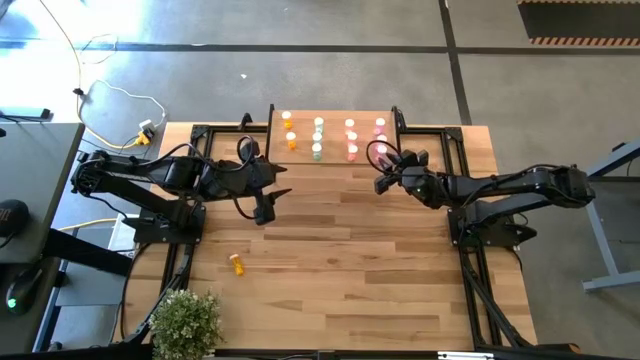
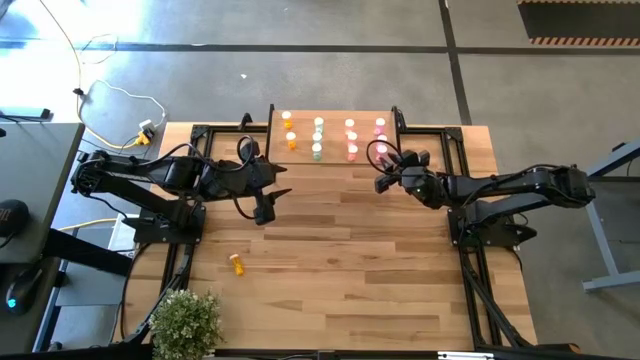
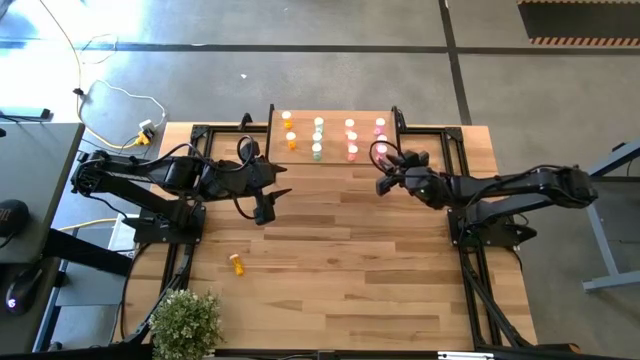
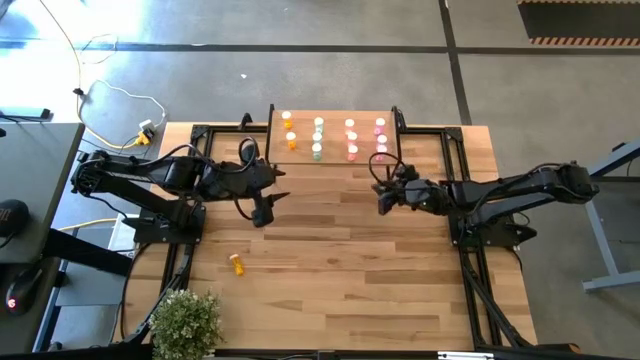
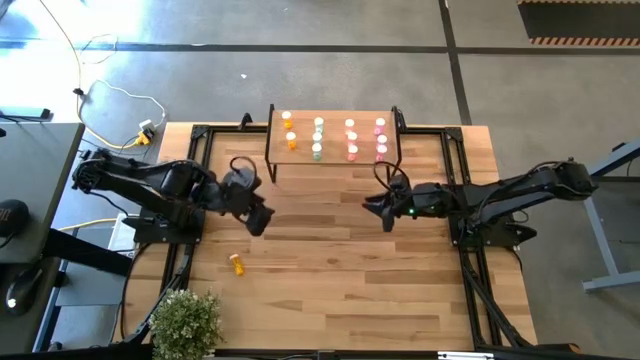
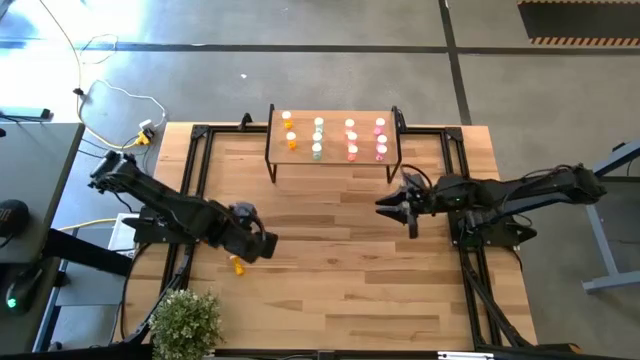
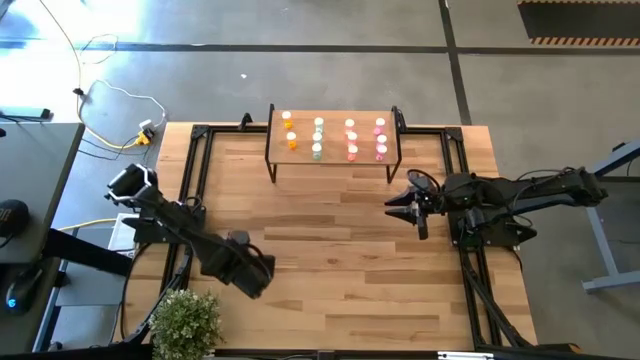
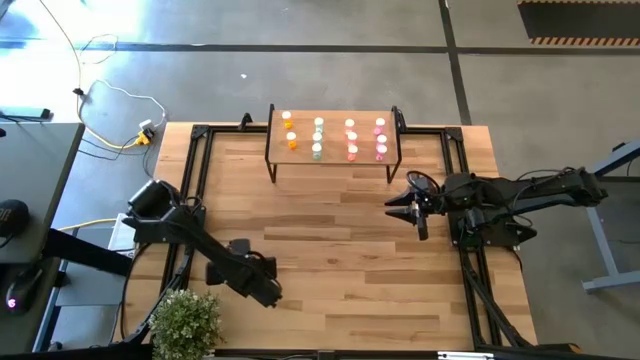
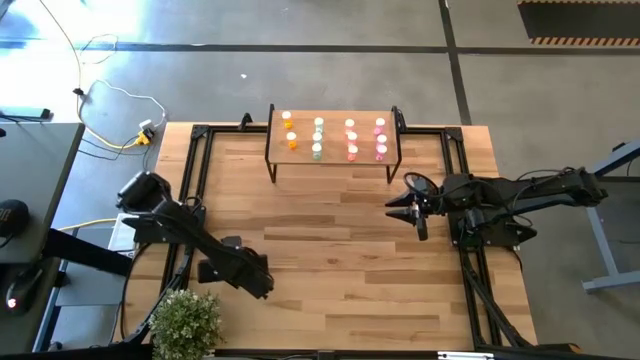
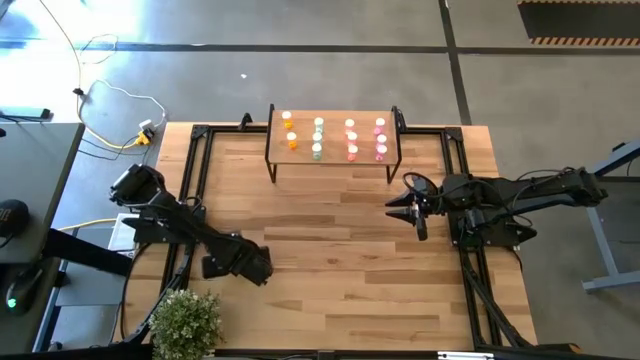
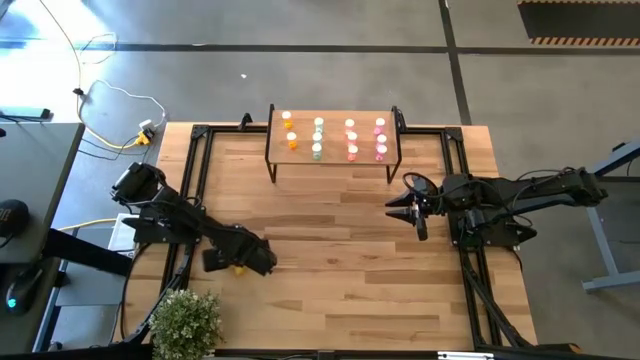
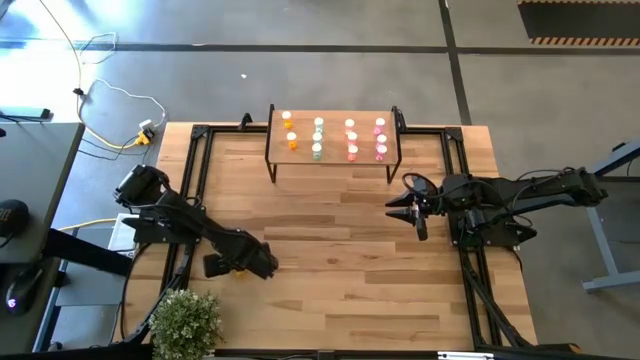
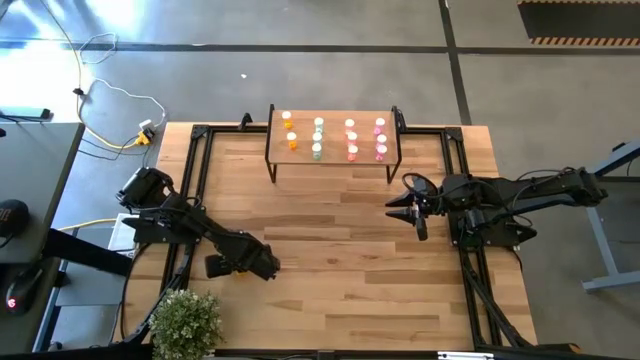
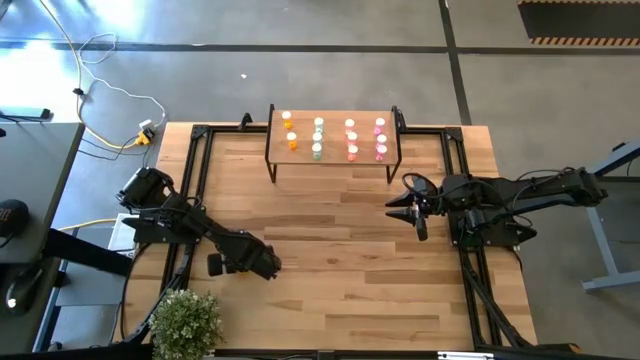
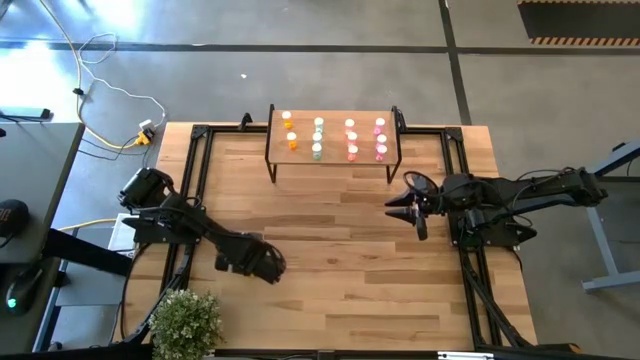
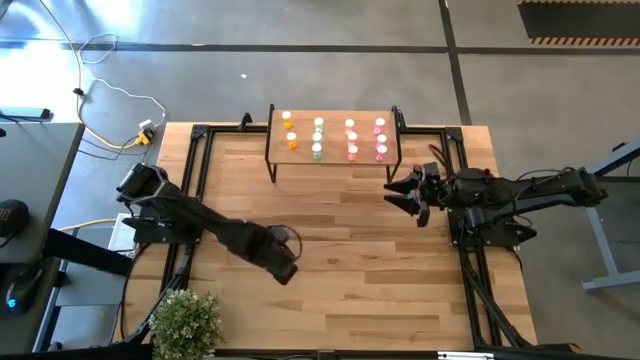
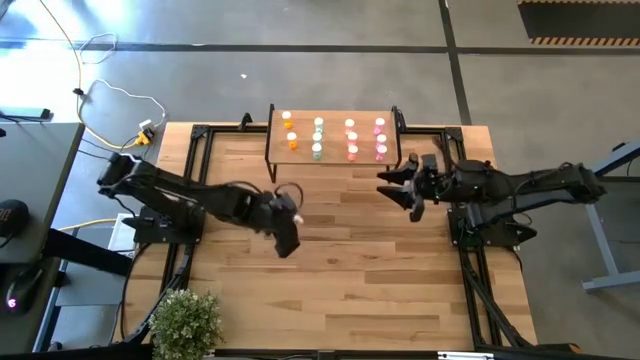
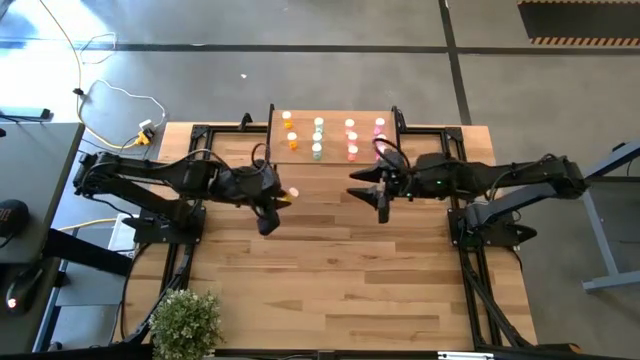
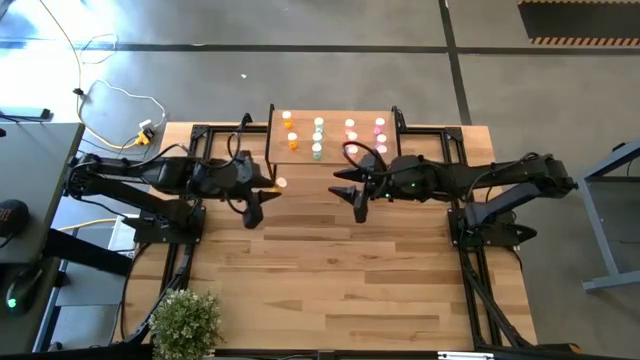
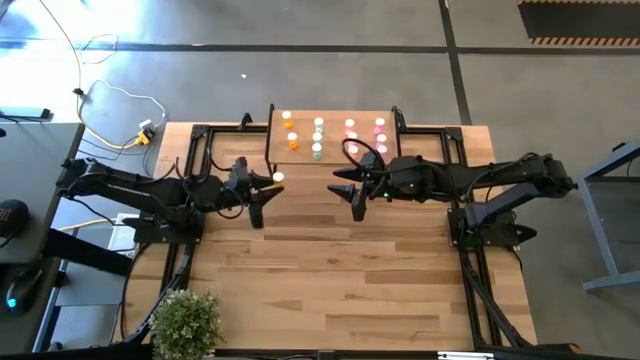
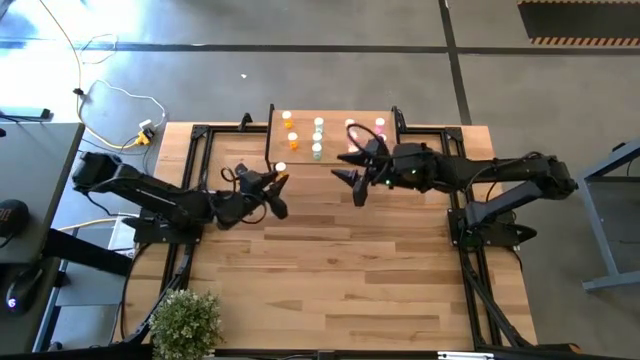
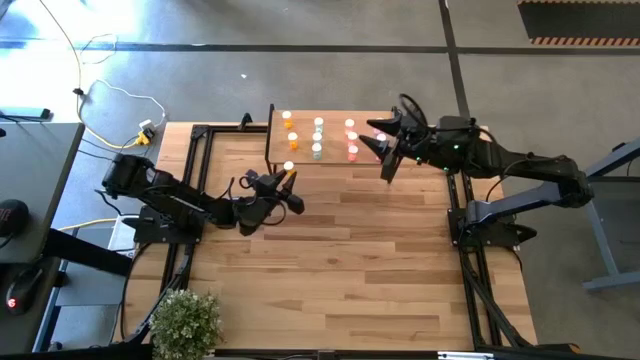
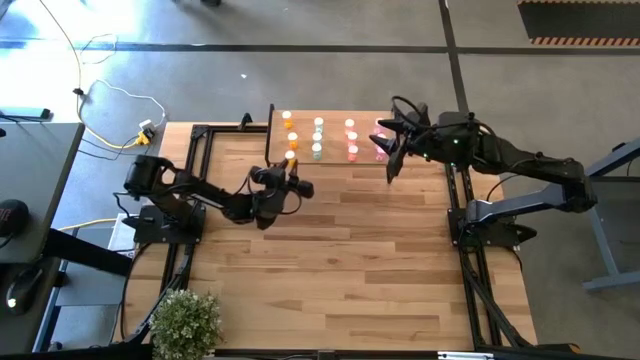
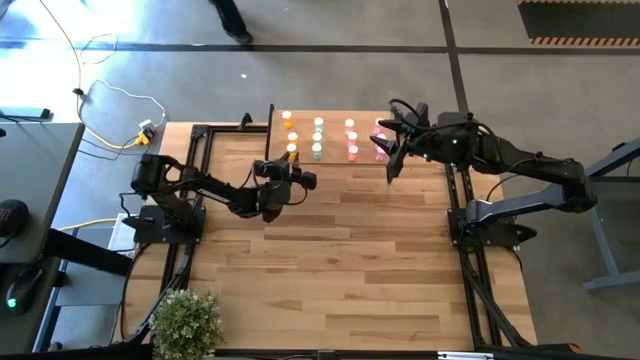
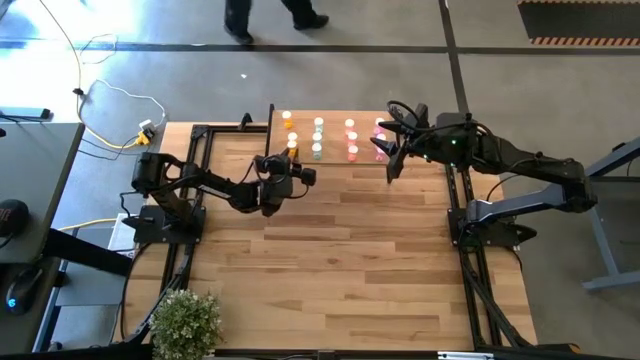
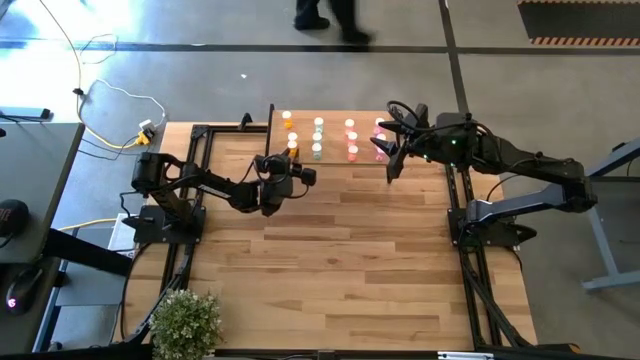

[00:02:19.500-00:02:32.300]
Task: Pick and place medicine bottles onto shelf by color
Put the orange pill bottle on the shelf aligned with the orange pill bottles

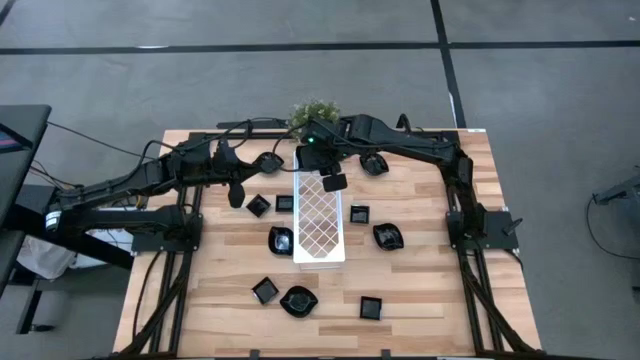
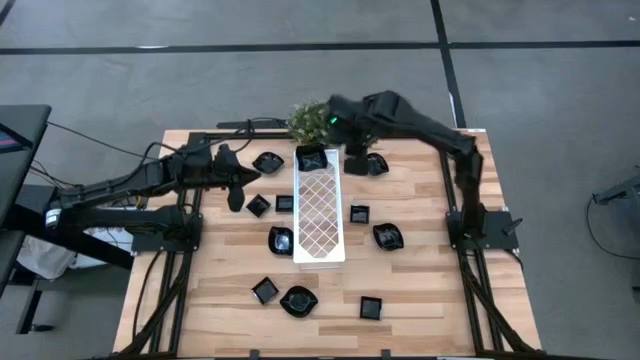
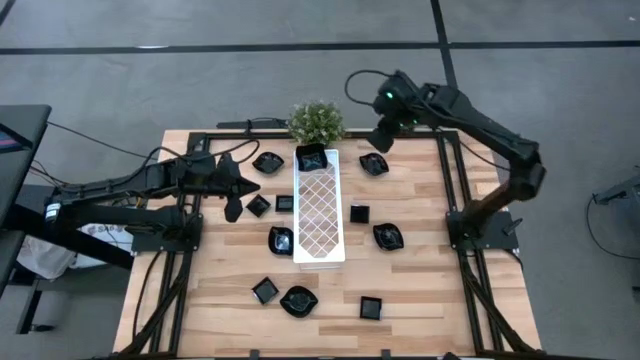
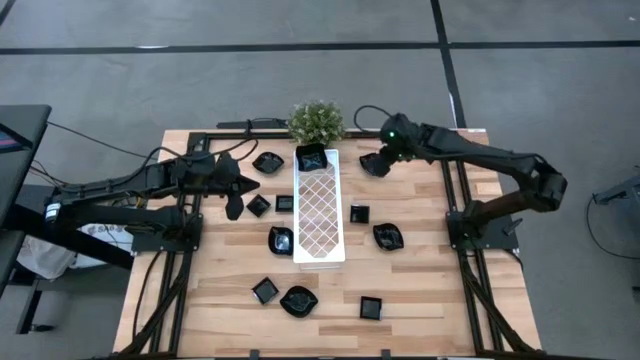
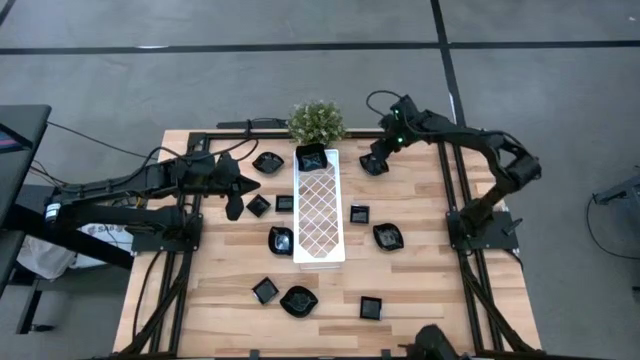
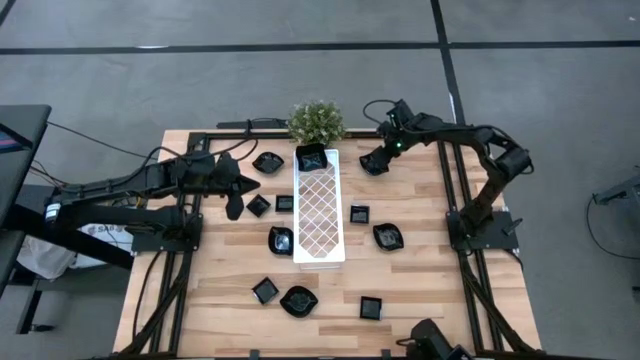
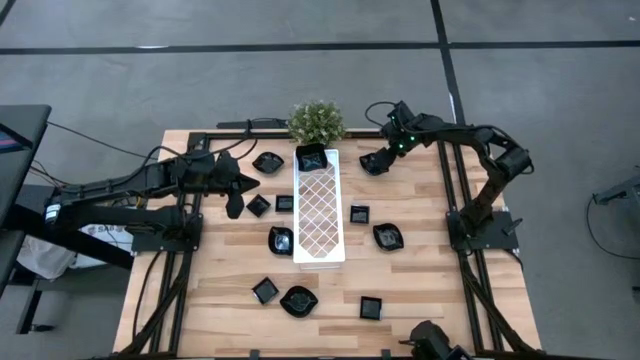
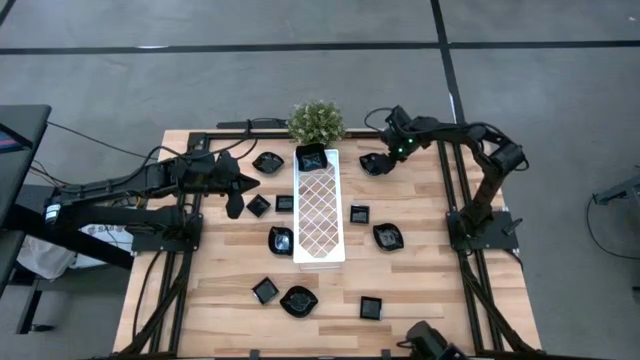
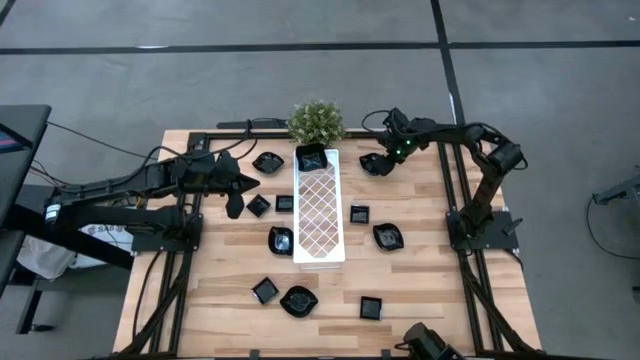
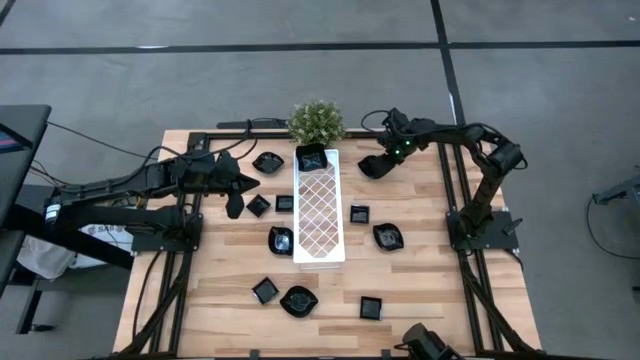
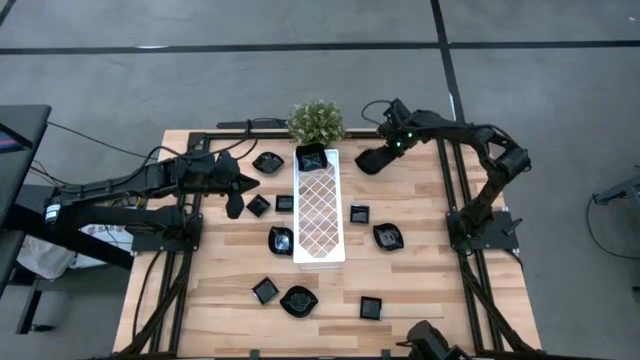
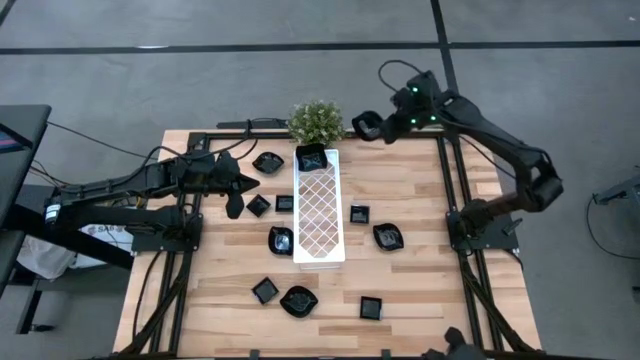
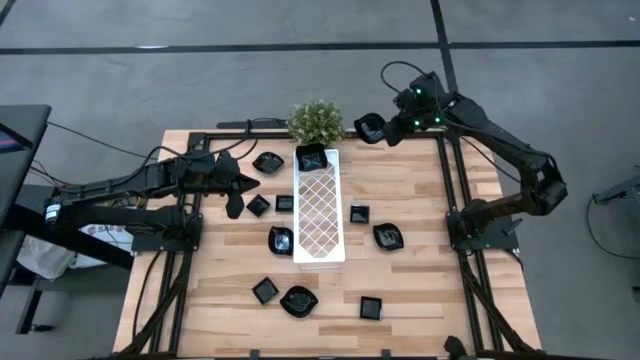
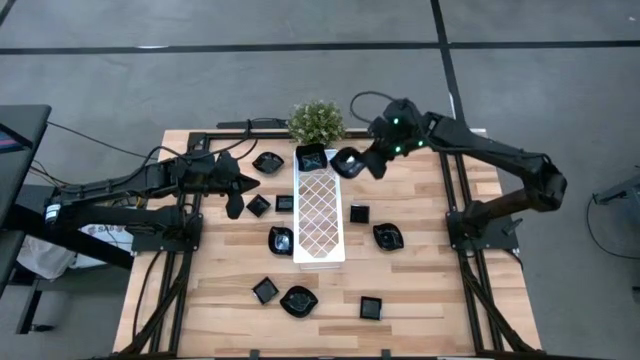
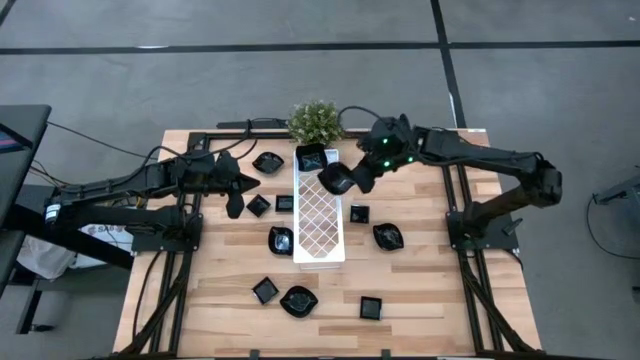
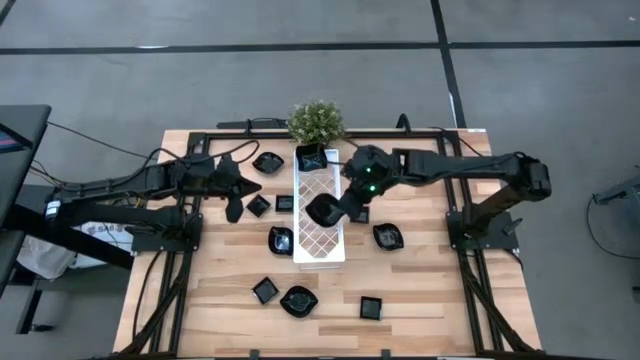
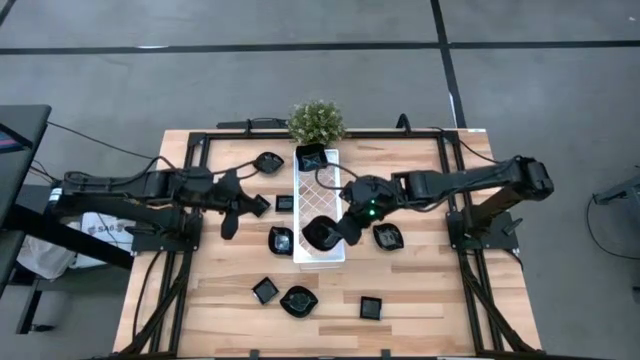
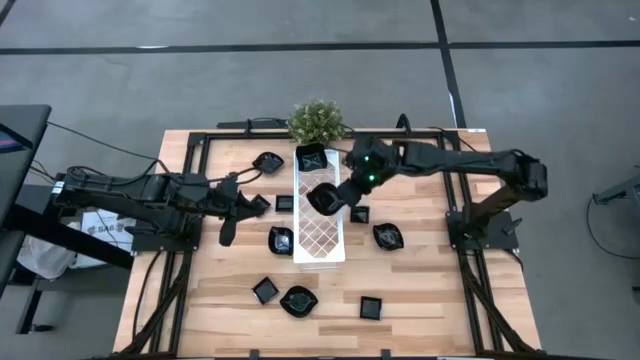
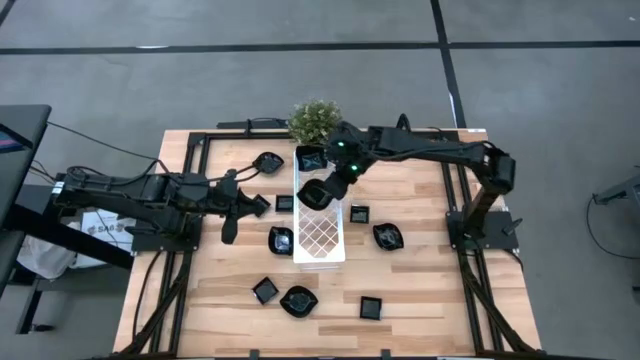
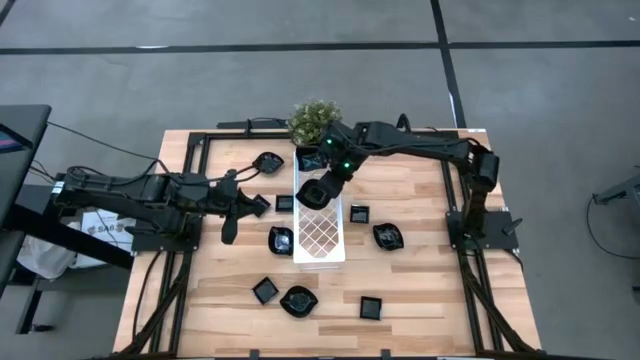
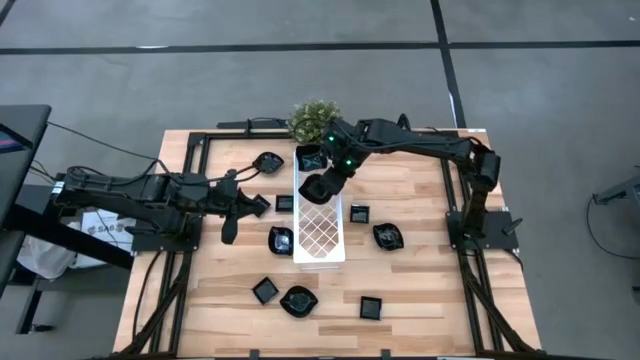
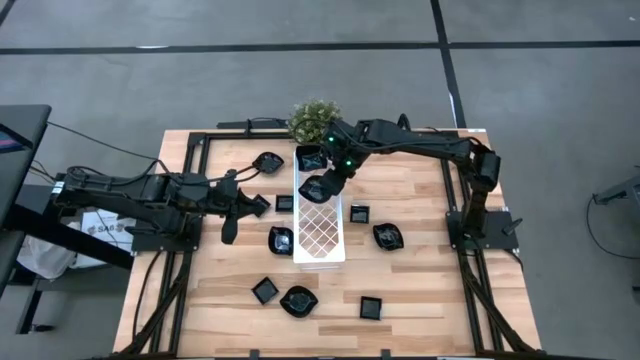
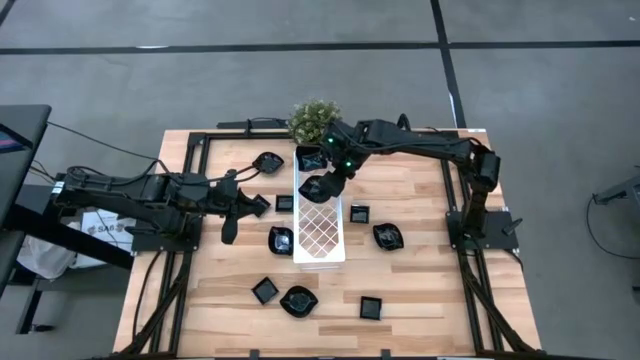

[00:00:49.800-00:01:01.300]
Task: Pick & Place Mini shaped plates
Put the leaf-shaped plate on the shelf
